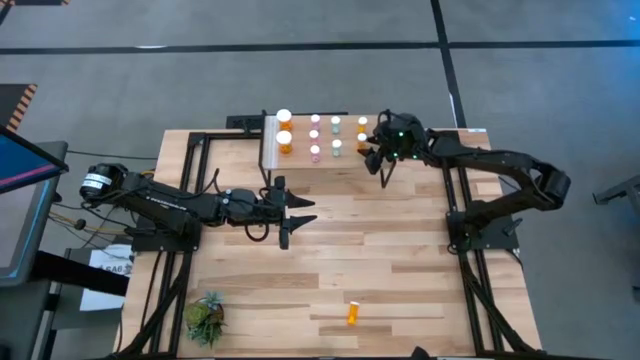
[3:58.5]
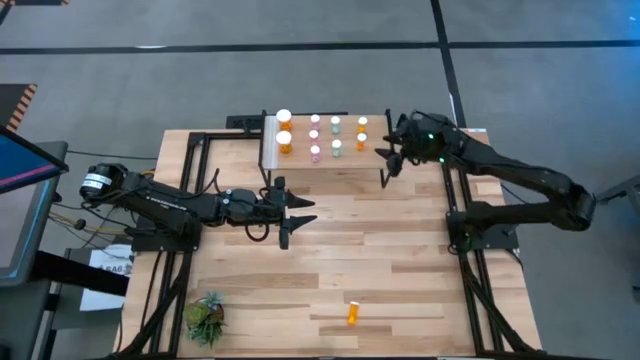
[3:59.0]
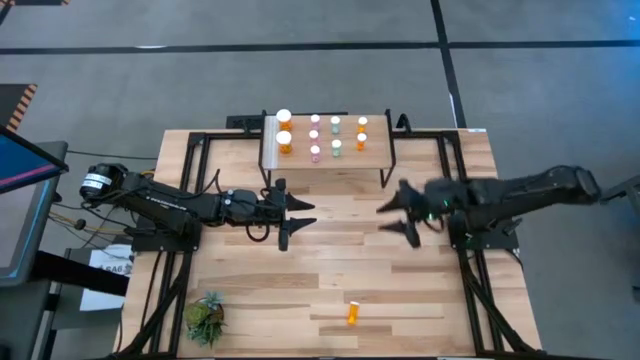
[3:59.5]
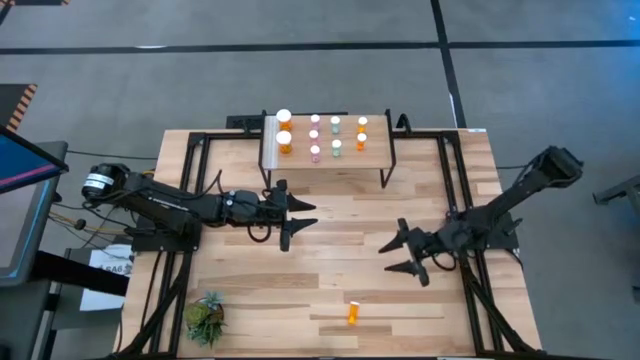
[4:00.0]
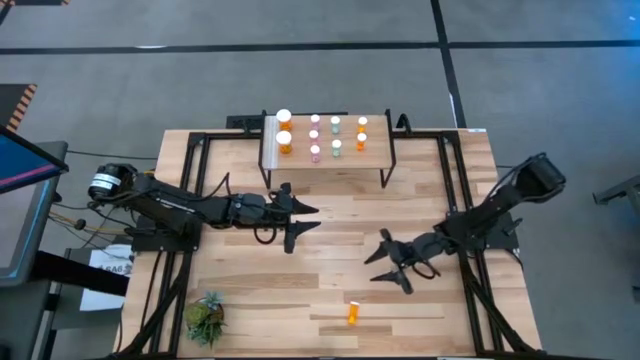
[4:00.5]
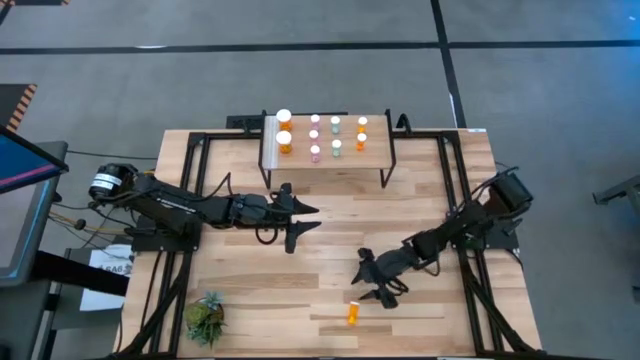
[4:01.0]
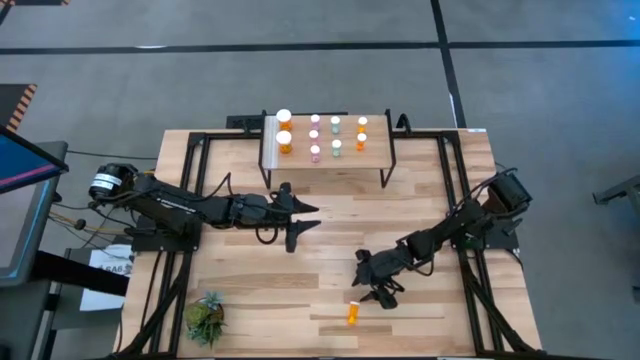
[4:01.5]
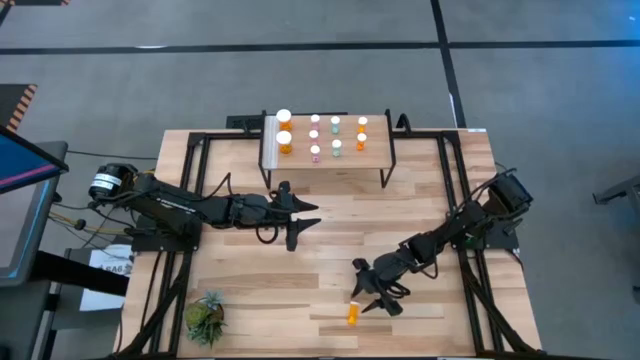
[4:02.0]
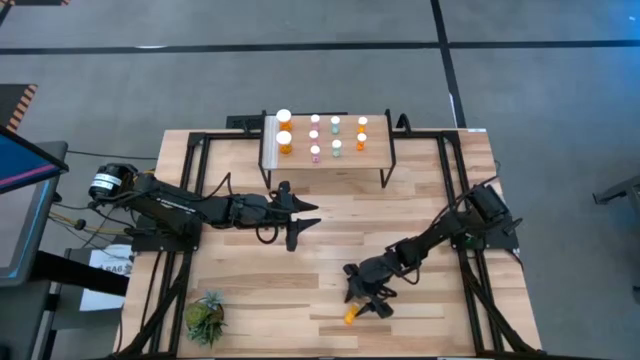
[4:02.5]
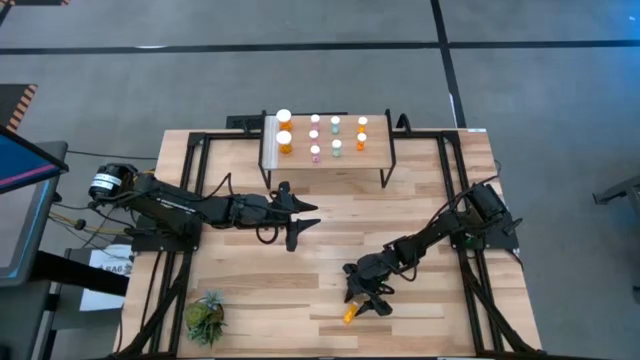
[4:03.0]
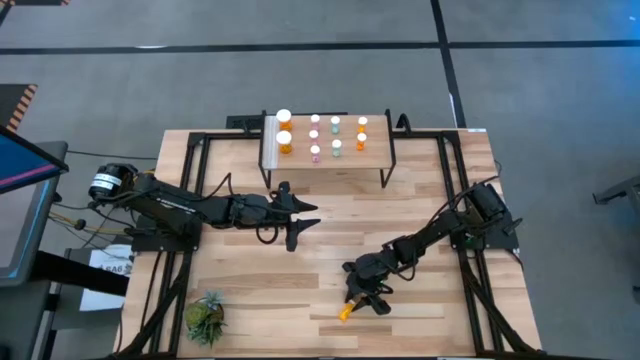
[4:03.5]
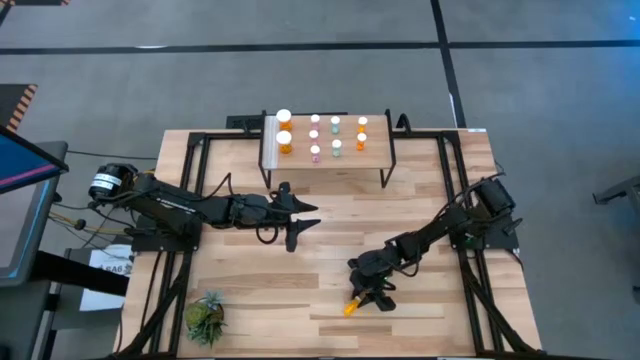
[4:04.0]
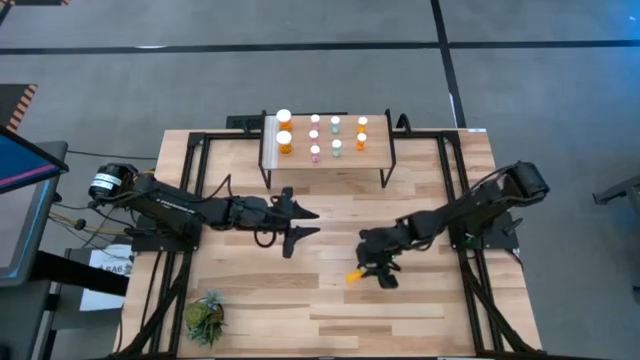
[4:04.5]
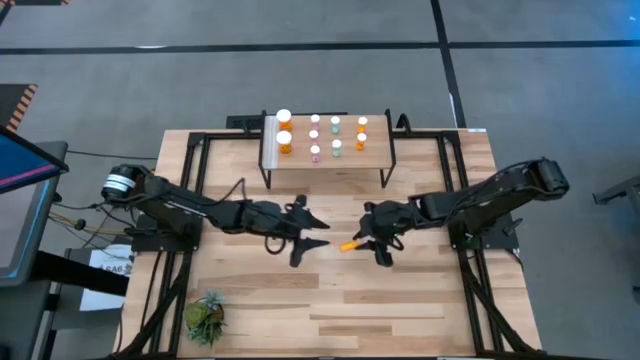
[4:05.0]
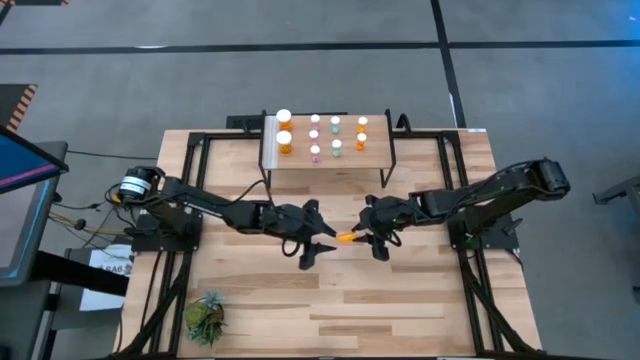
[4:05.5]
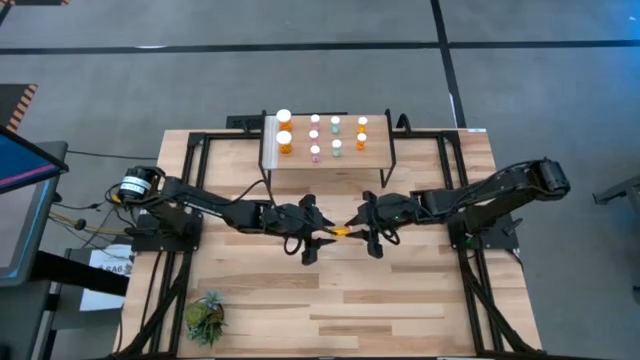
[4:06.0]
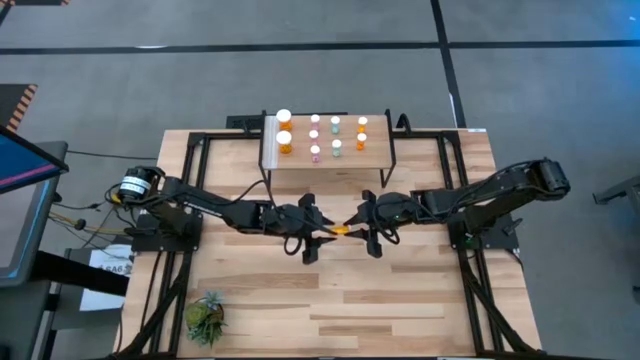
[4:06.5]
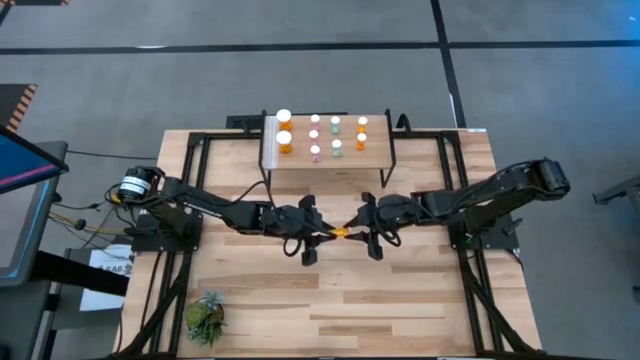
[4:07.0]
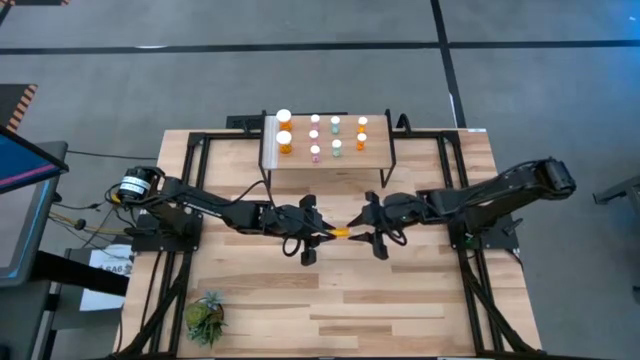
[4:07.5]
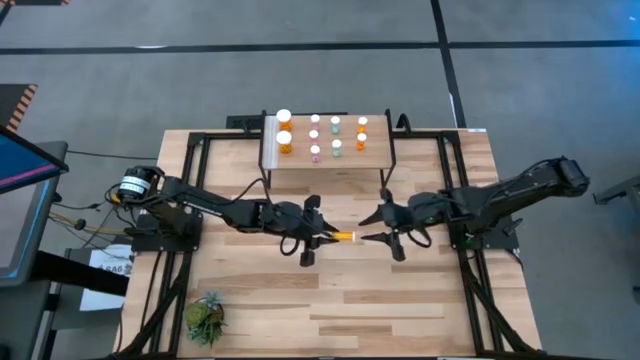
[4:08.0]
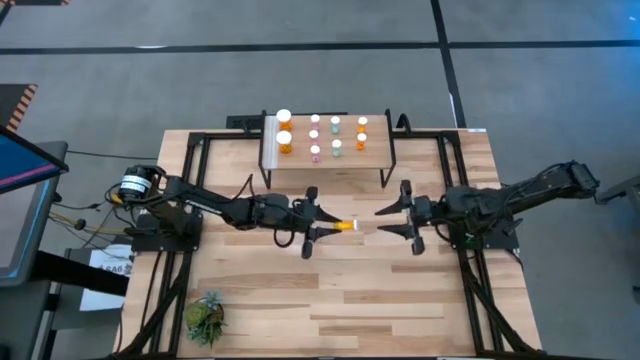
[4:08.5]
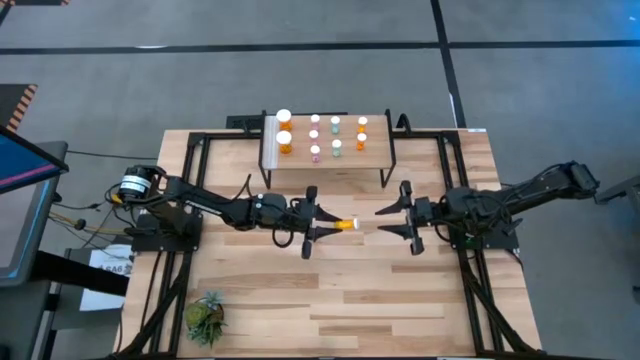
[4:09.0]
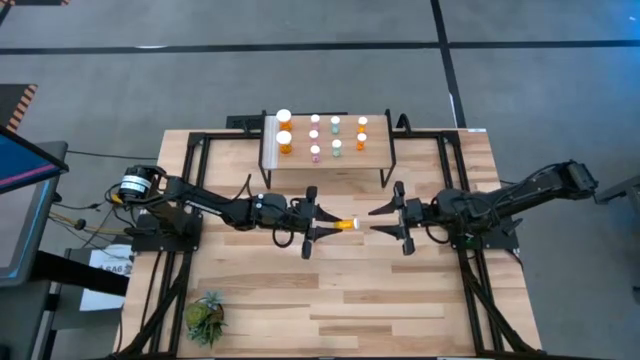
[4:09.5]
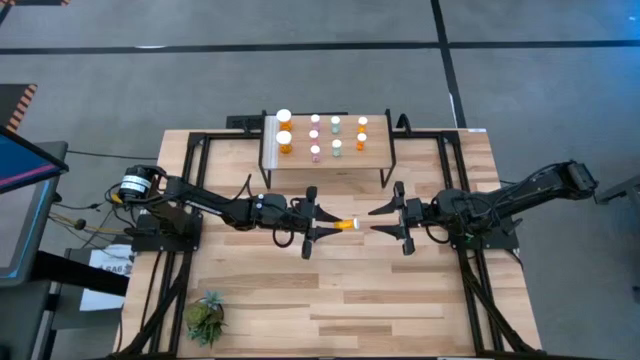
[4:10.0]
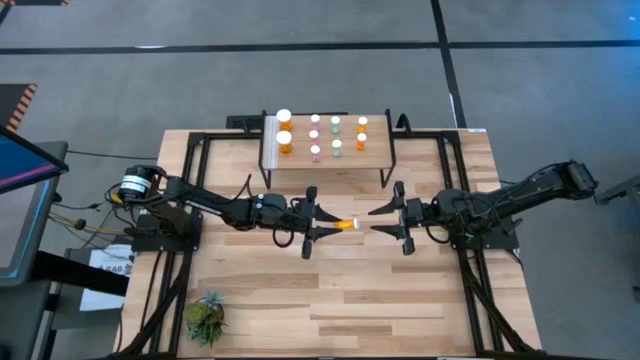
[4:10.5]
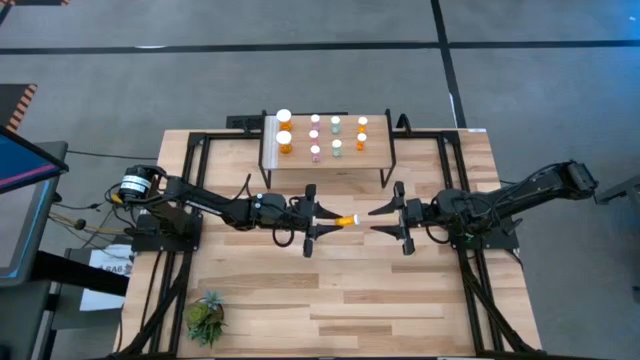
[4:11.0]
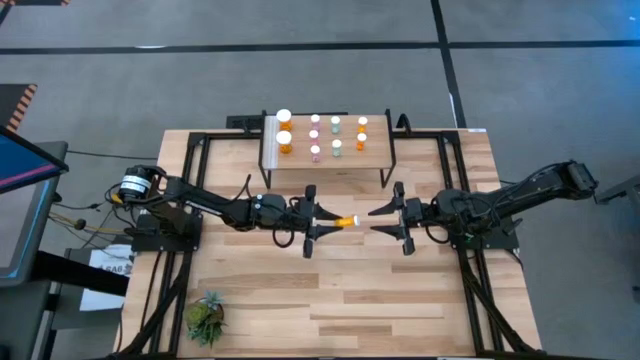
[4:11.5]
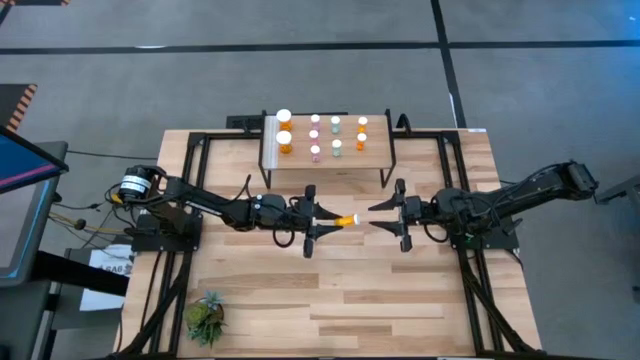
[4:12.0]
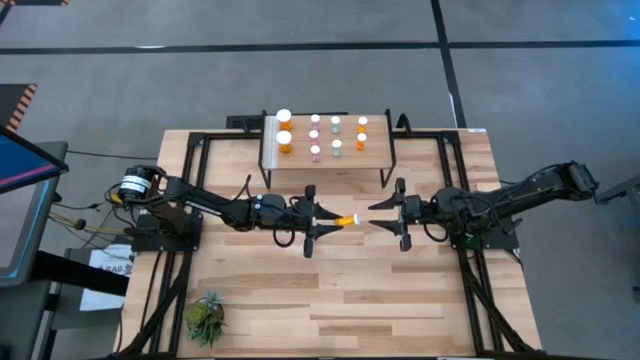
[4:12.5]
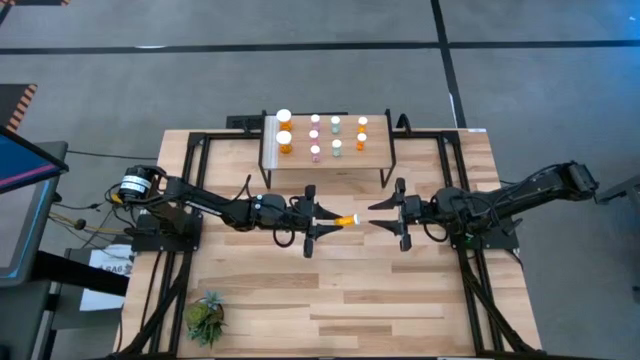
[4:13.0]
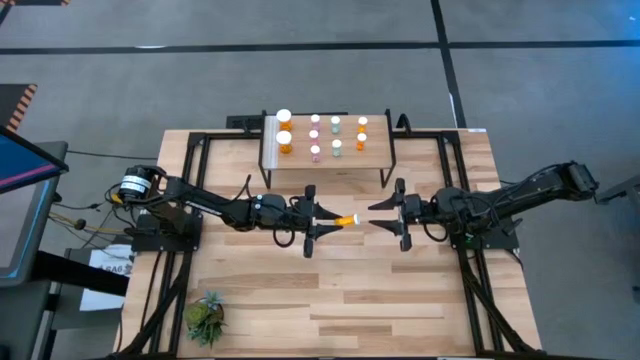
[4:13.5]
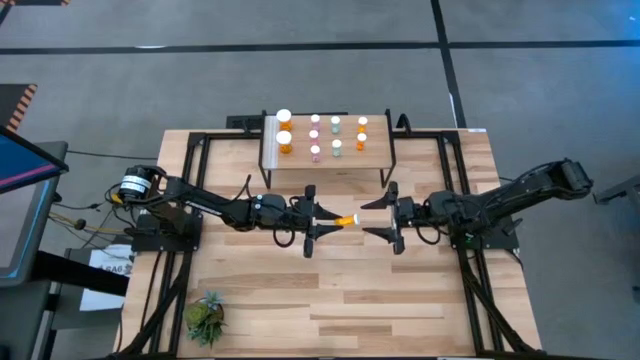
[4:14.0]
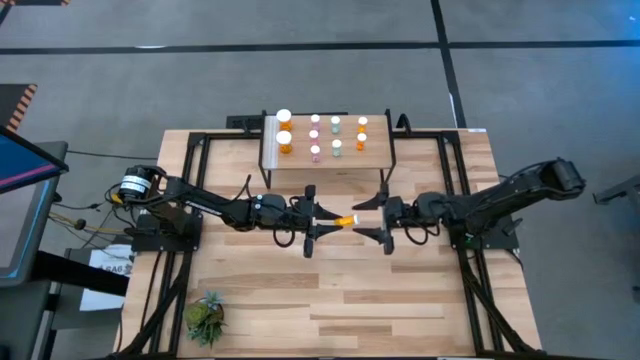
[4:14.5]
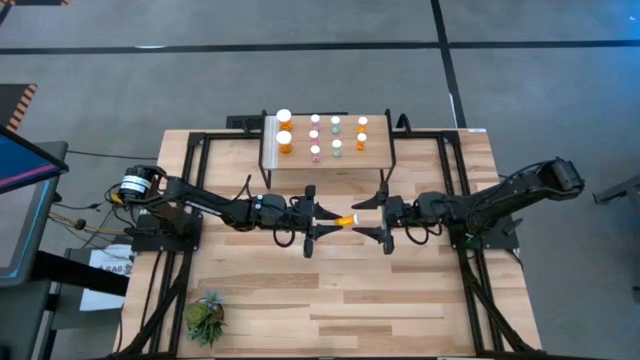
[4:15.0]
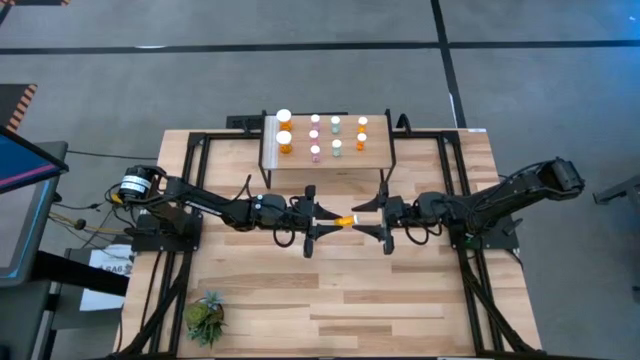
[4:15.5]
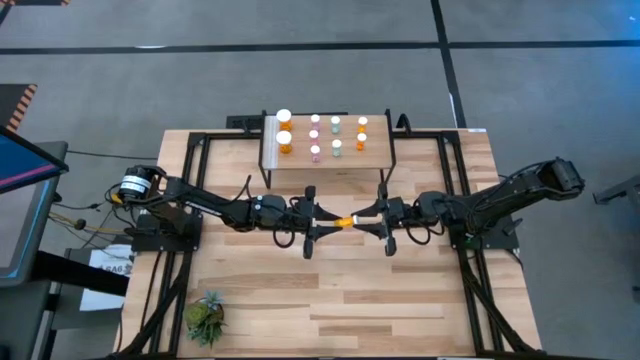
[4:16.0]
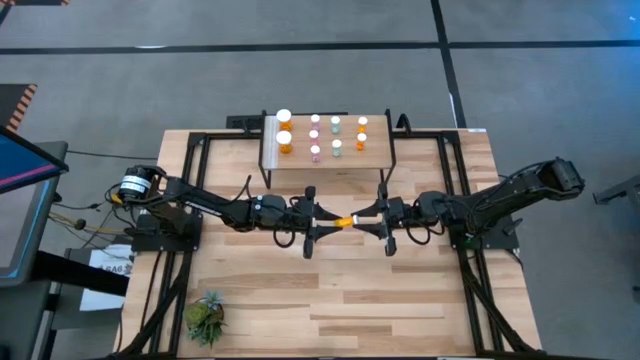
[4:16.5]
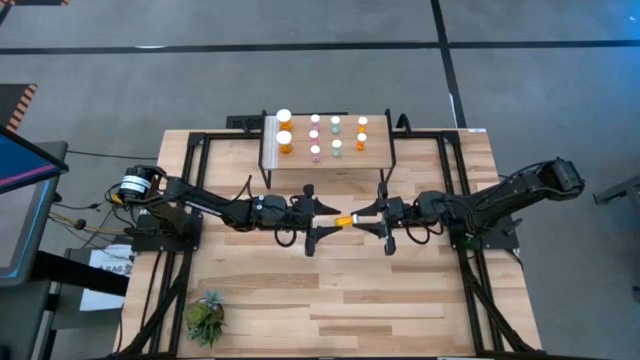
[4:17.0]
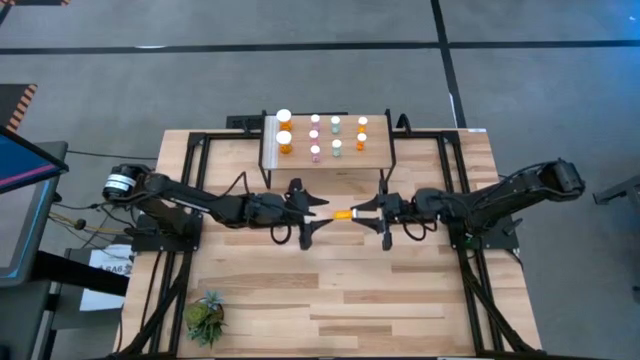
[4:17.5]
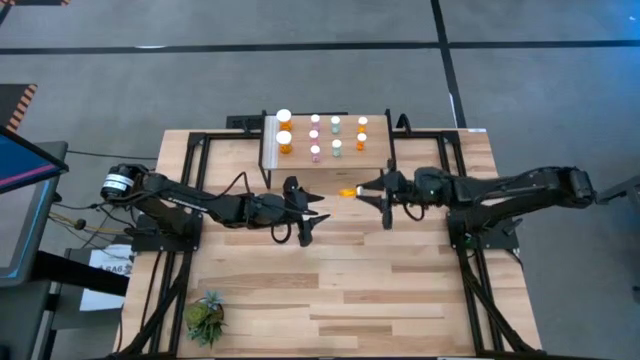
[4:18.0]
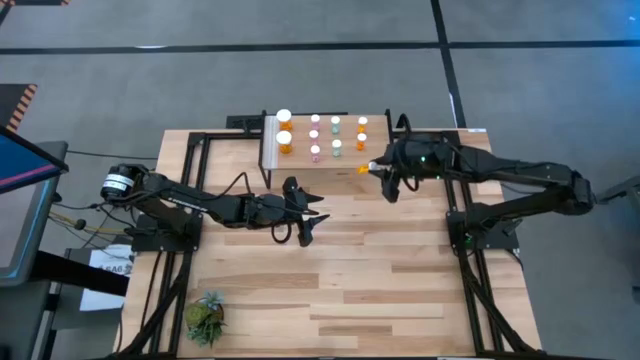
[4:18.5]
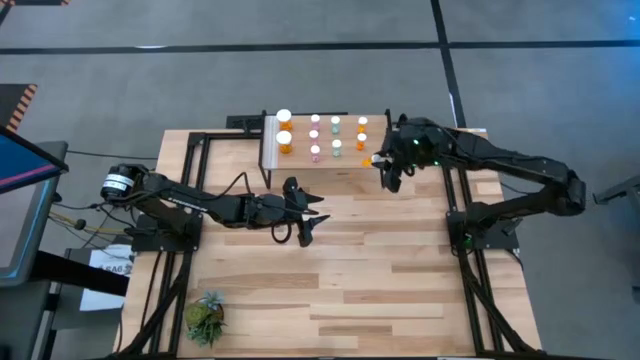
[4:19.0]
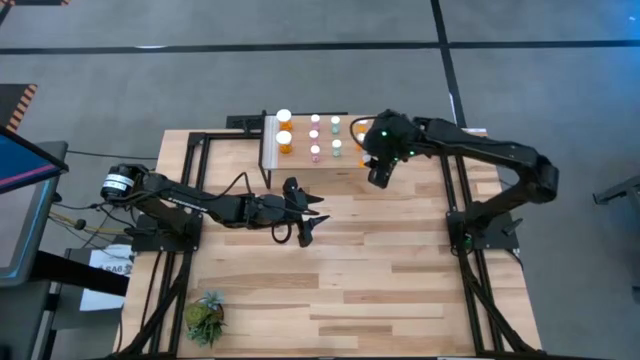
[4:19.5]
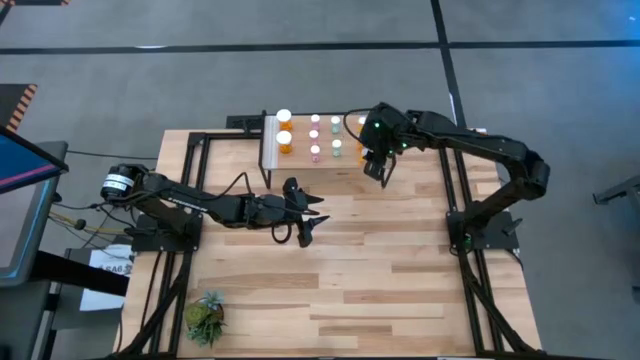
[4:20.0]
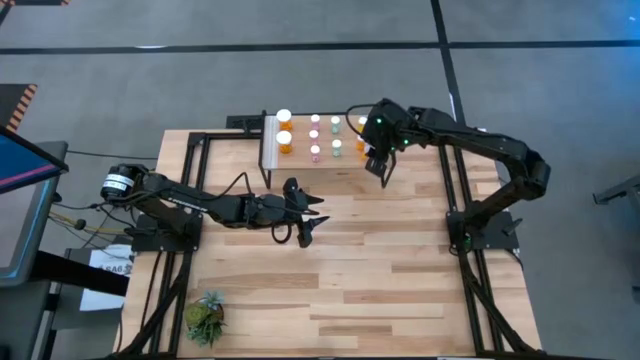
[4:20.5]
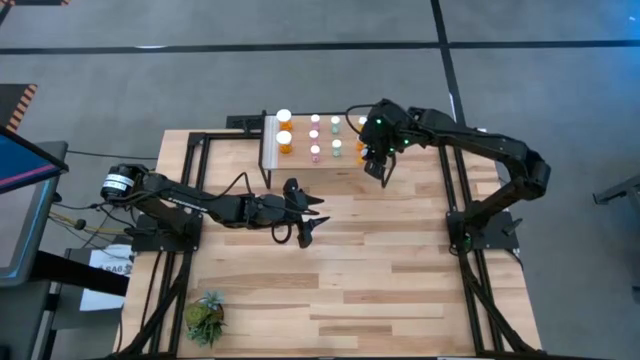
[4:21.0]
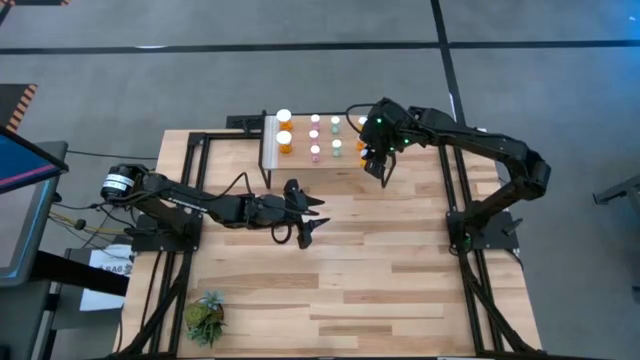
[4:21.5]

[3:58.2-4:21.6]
Task: Pick and place medicine bottles onto shelf by color
Put the small orange pill bottle on the shelf aligned with the other small orange pill bottles
